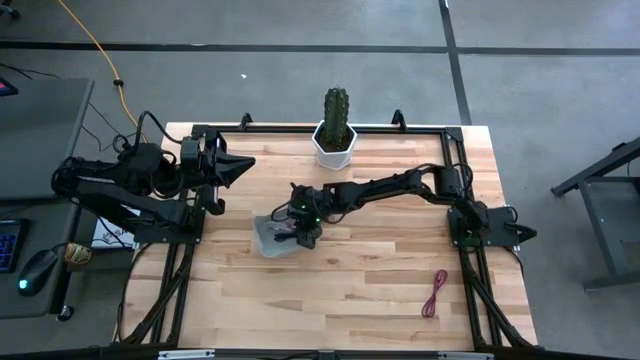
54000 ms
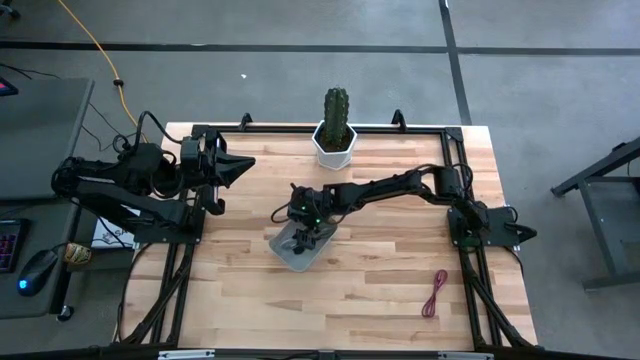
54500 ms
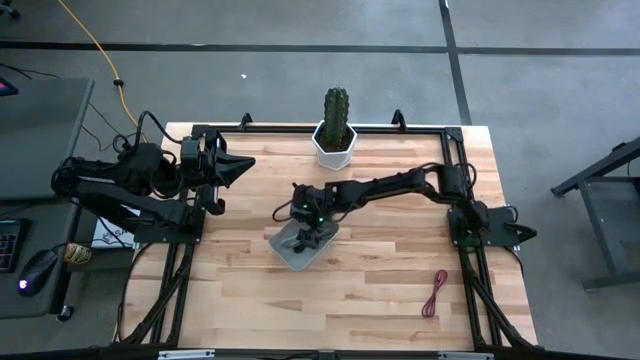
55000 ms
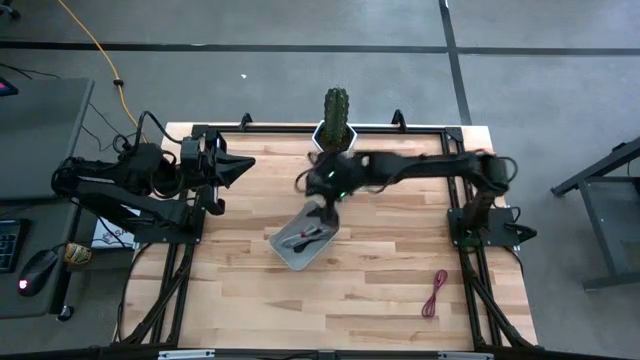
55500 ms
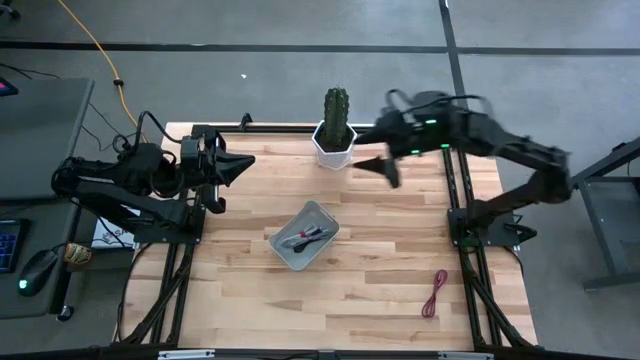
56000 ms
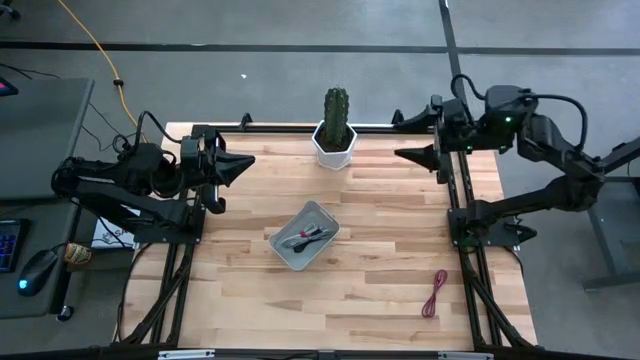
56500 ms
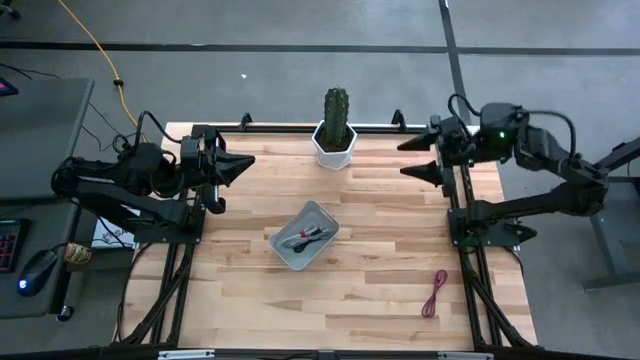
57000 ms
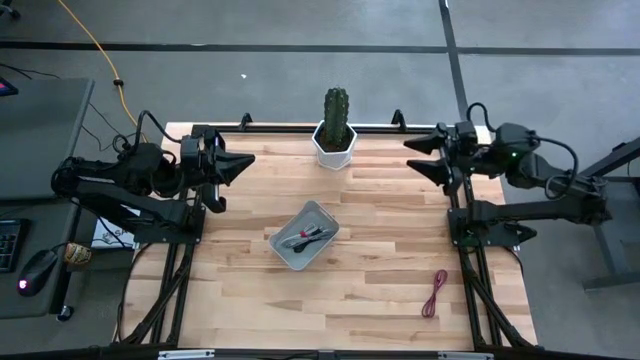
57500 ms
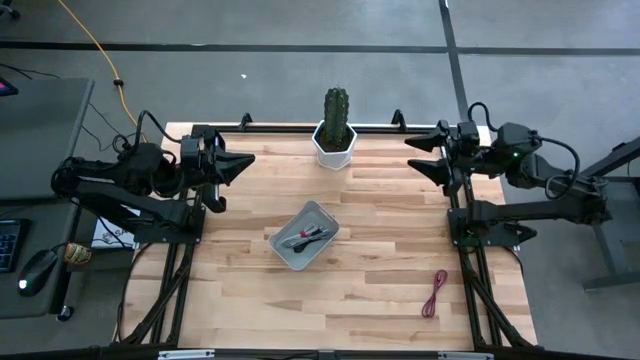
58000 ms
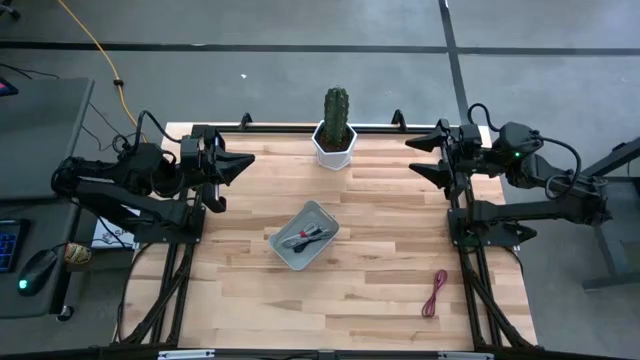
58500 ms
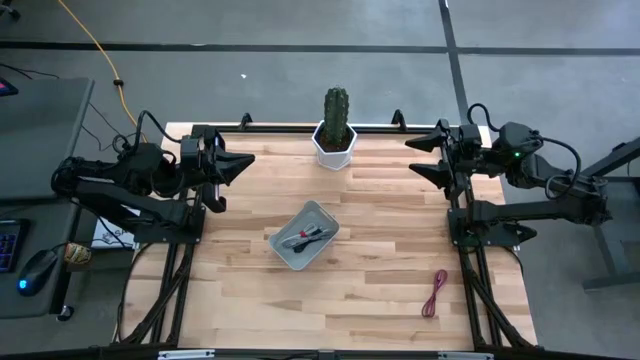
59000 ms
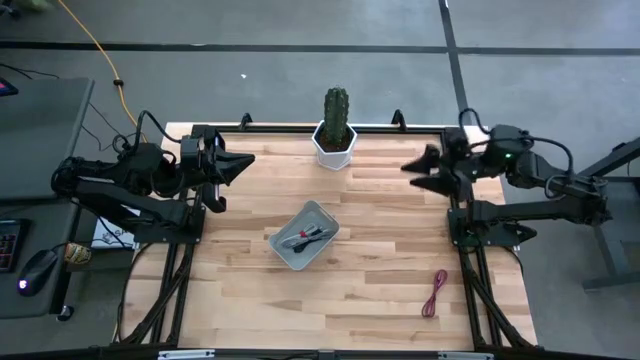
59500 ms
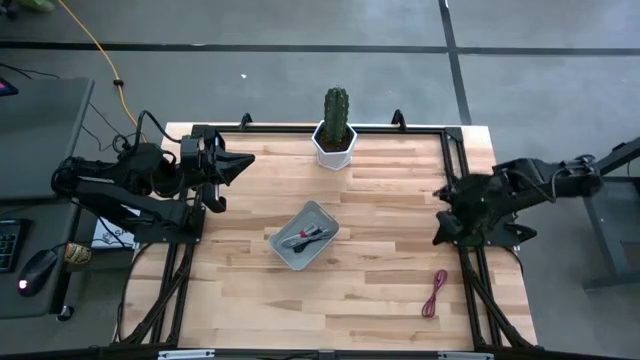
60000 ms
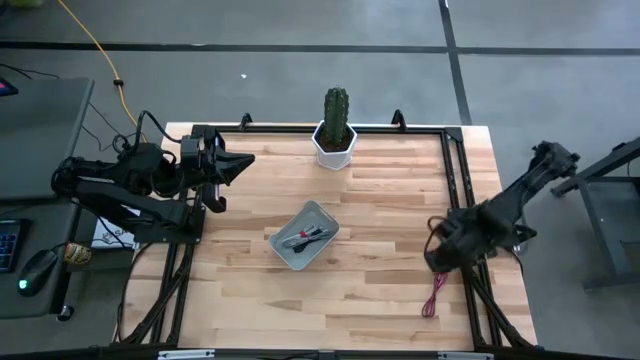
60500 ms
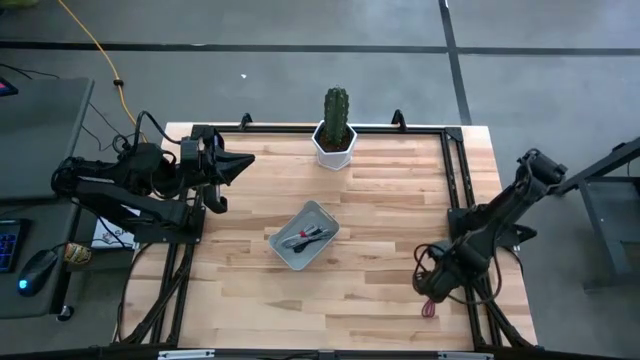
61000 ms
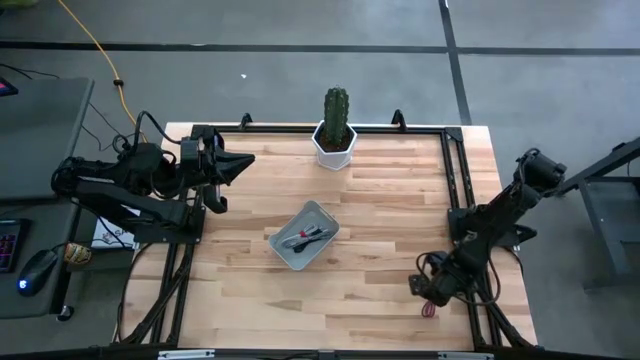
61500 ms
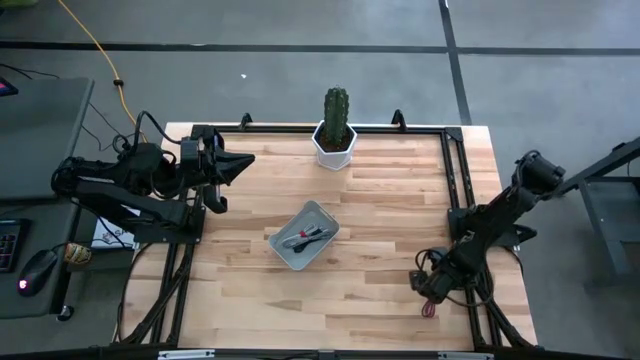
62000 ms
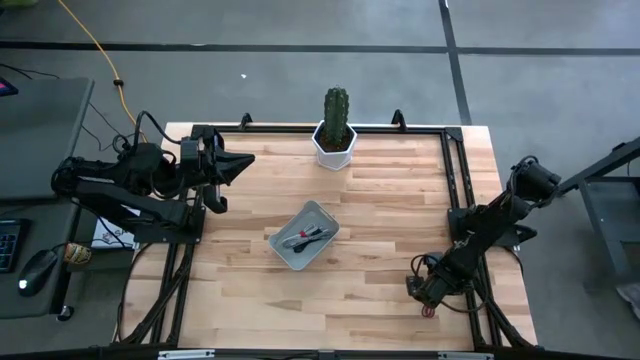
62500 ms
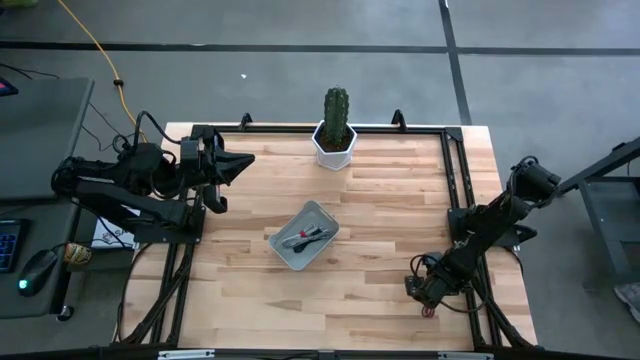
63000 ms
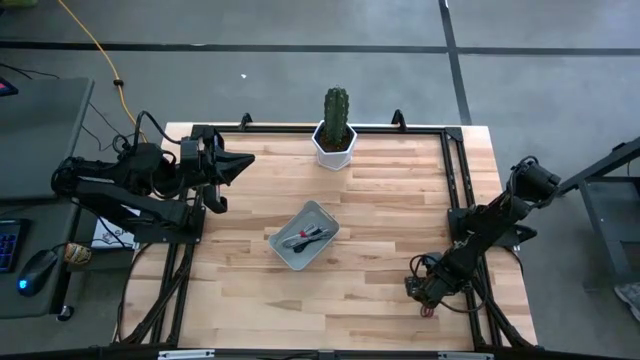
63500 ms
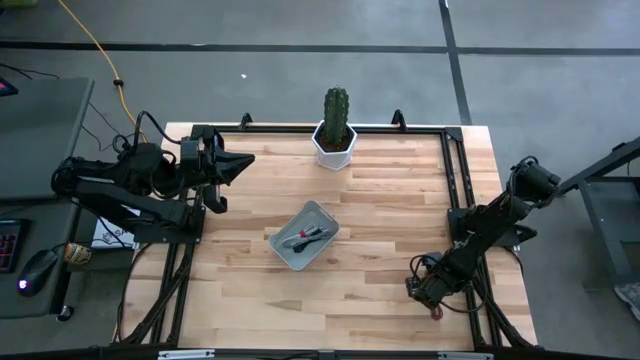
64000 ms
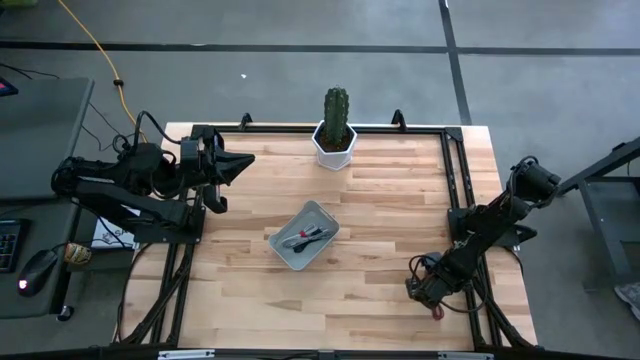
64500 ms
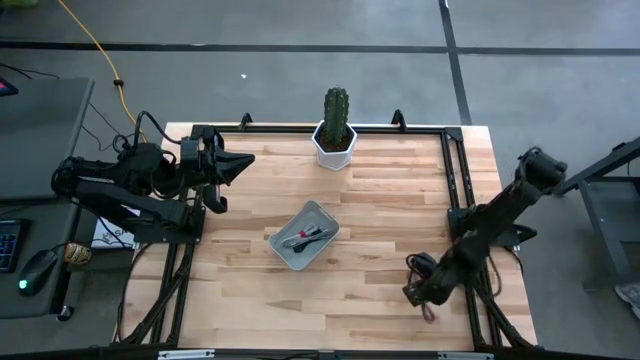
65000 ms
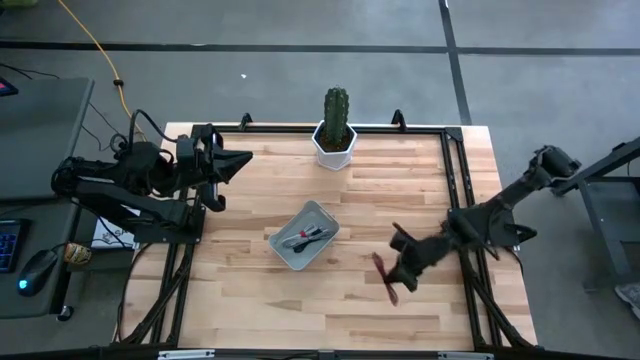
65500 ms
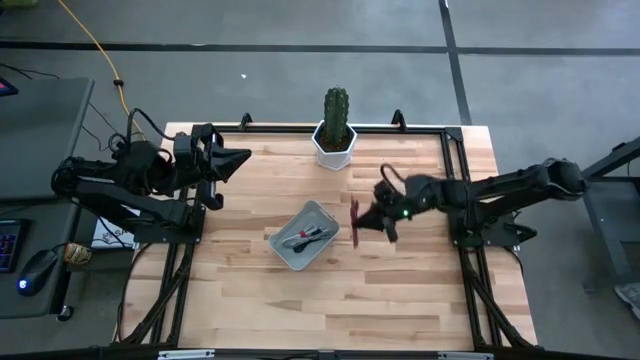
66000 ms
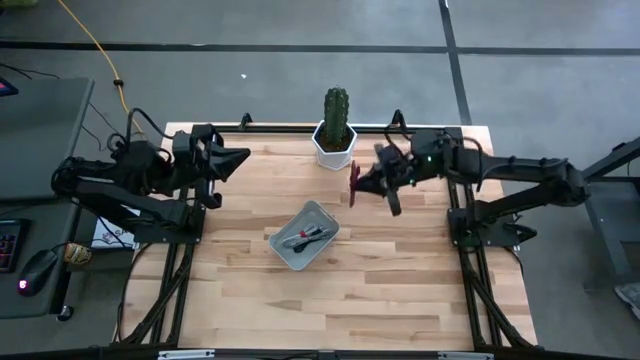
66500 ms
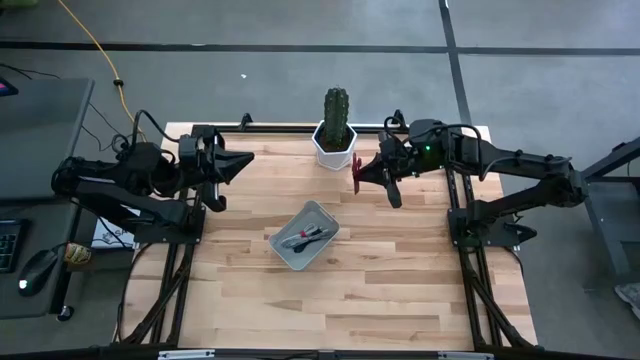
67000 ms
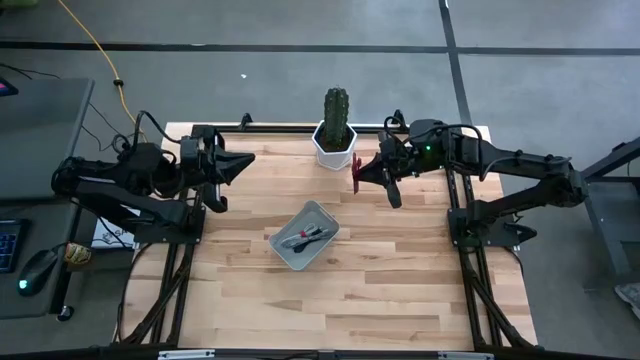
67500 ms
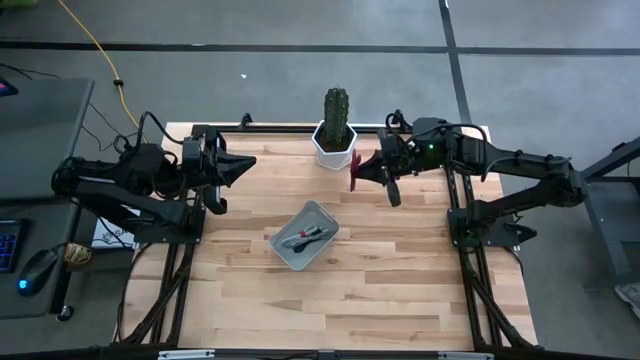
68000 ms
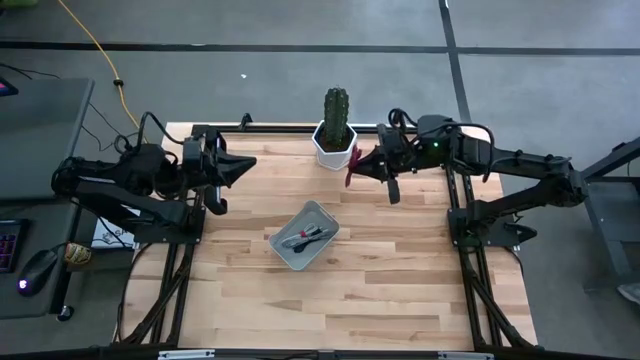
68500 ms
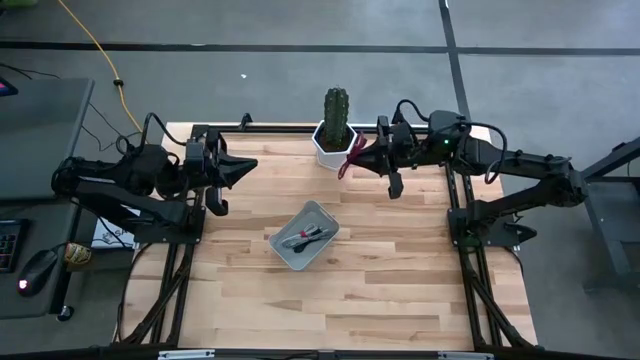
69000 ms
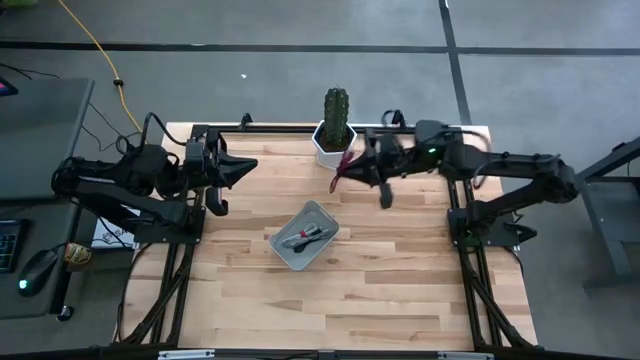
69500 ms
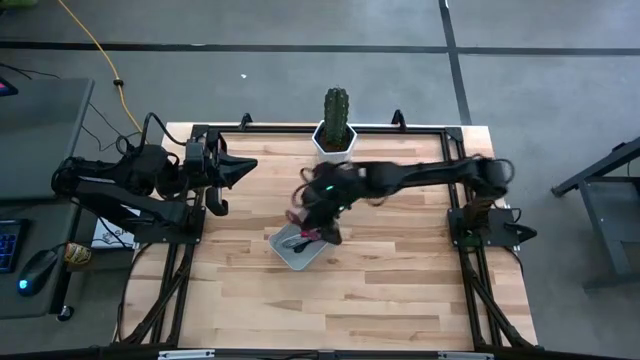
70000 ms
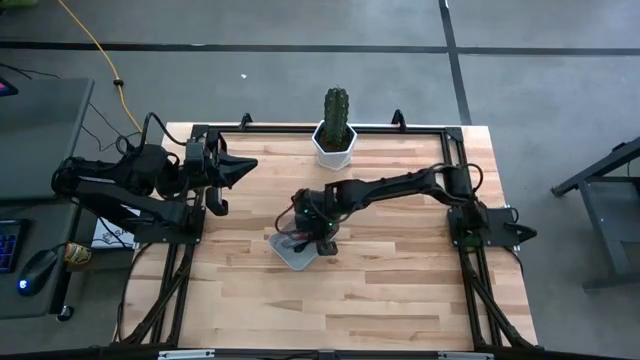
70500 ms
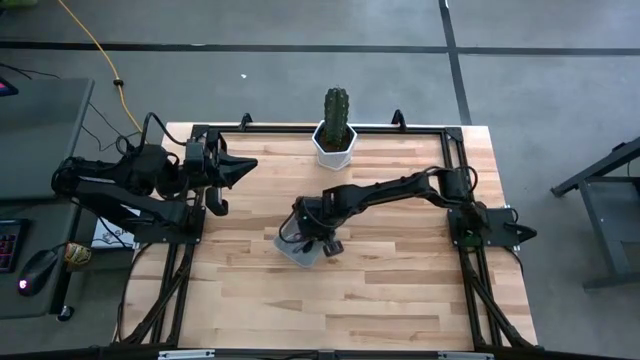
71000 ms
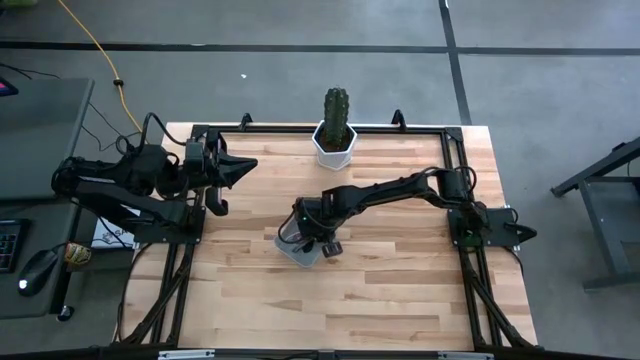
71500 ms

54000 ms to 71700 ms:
Task: Pick and place USB-C Cables
Put the pink and black charger cable into the gray bin

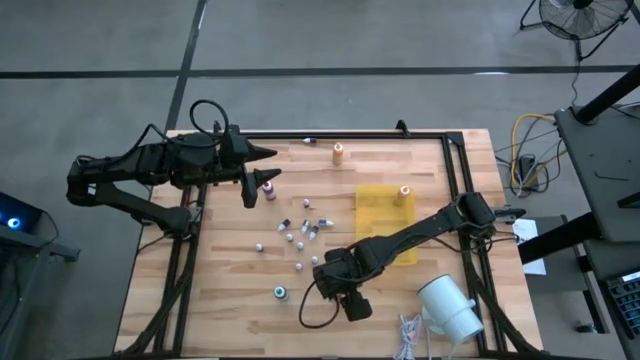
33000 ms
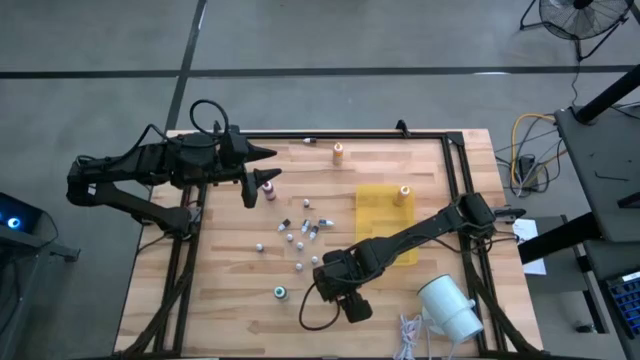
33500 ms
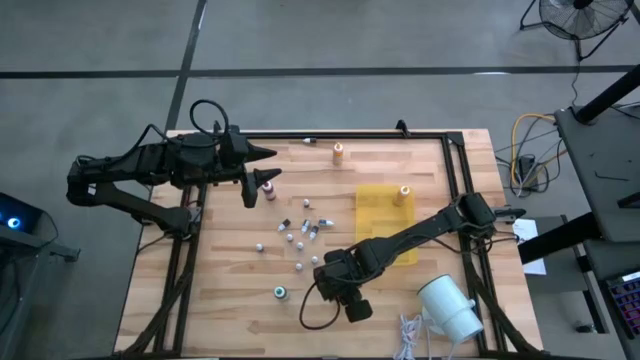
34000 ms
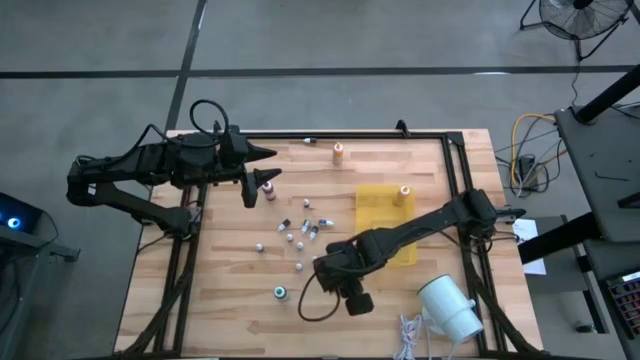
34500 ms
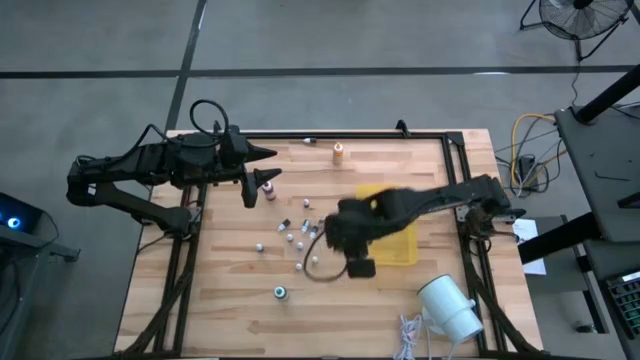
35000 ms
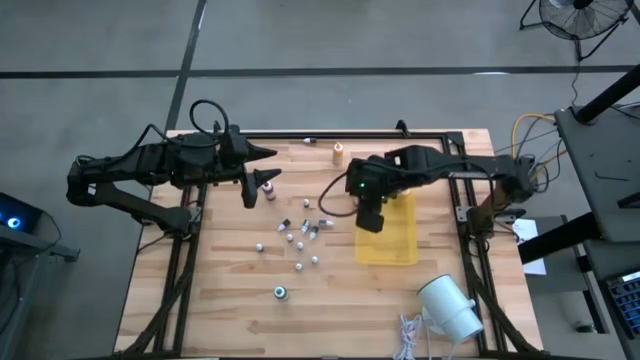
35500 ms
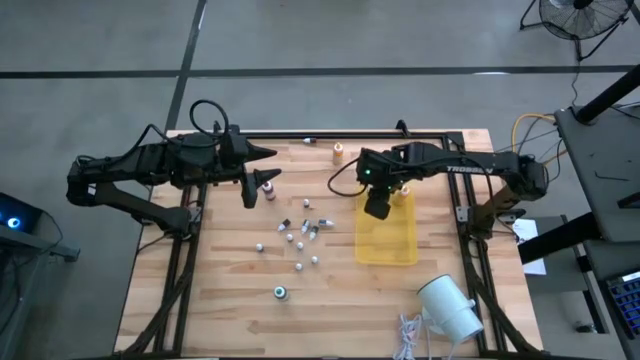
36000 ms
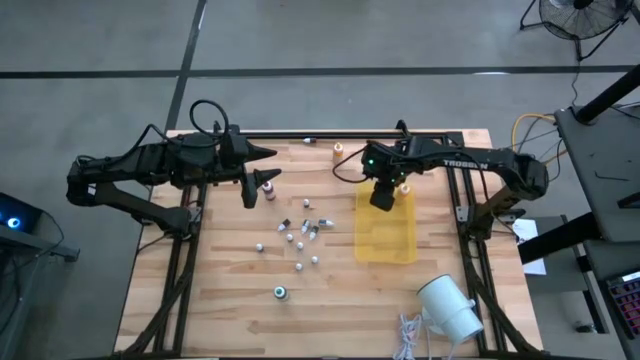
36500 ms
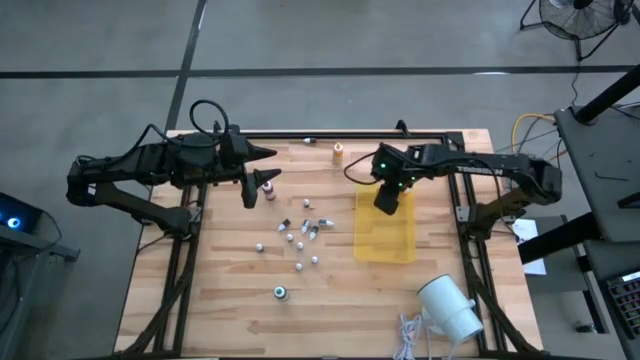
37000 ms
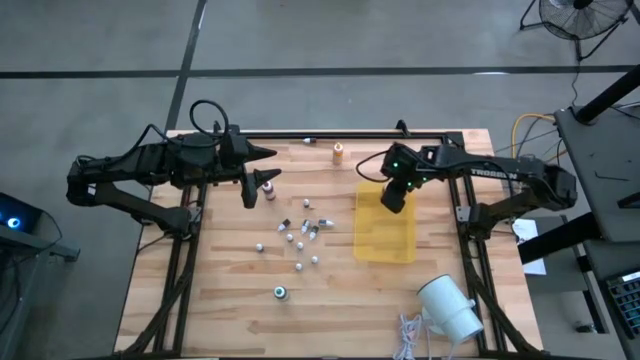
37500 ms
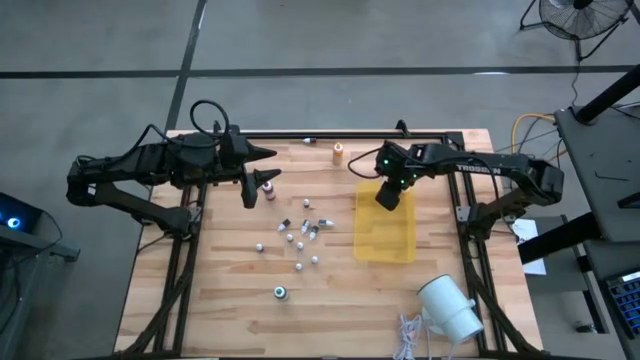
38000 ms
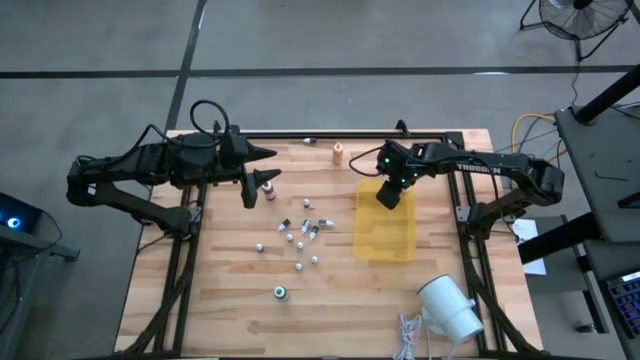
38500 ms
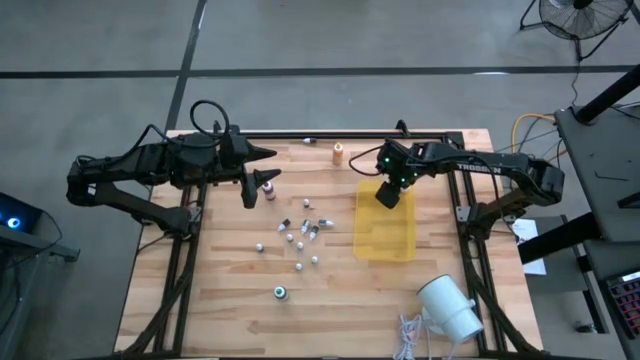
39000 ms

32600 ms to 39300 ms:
Task: Pick & Place food coloring
Put the big orange food coloring bottle into the yellow bin
